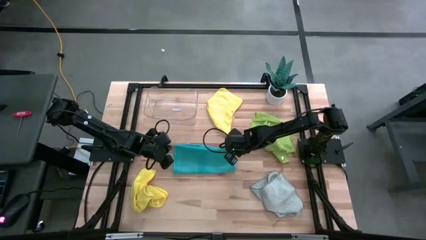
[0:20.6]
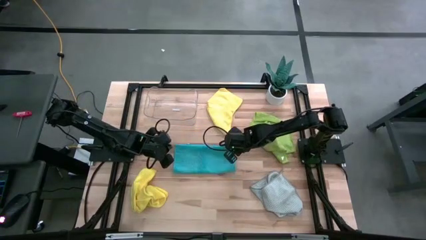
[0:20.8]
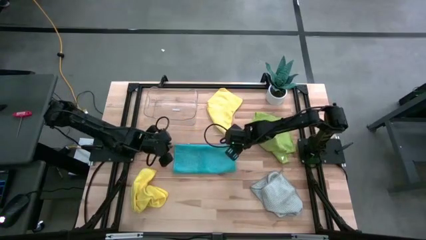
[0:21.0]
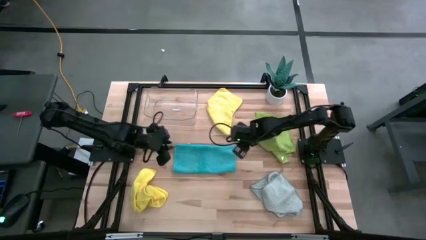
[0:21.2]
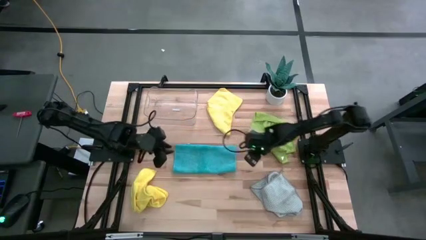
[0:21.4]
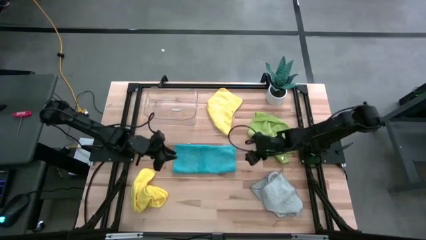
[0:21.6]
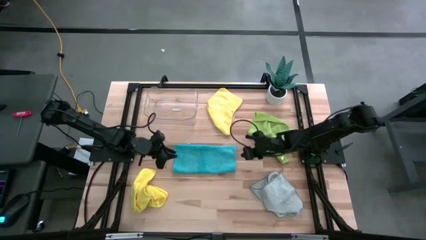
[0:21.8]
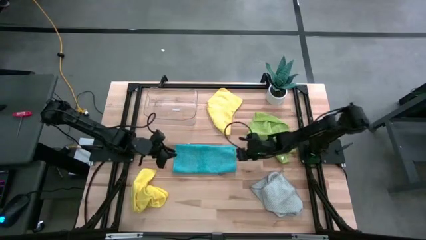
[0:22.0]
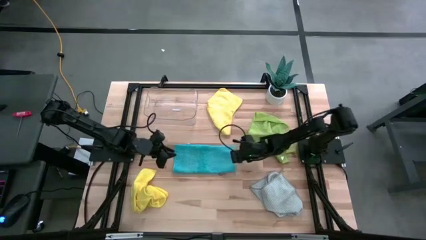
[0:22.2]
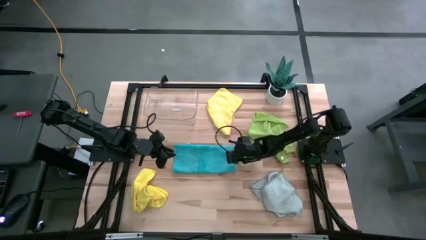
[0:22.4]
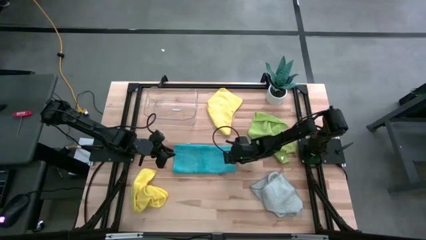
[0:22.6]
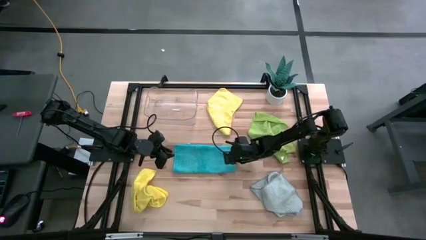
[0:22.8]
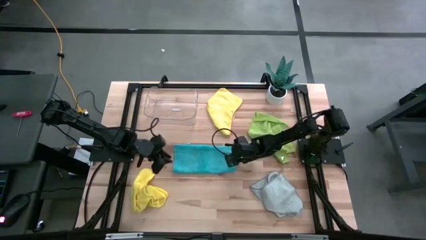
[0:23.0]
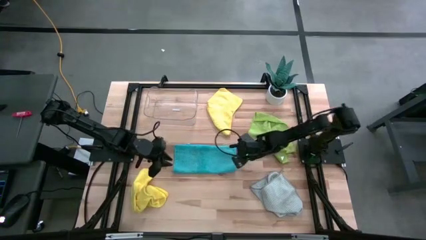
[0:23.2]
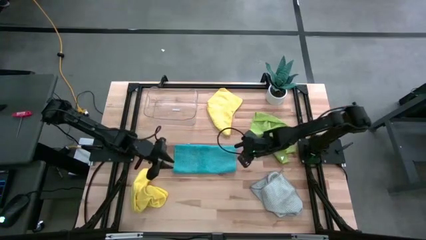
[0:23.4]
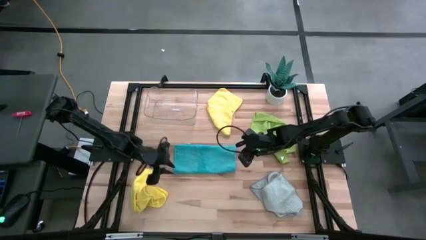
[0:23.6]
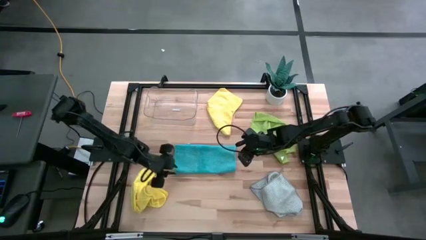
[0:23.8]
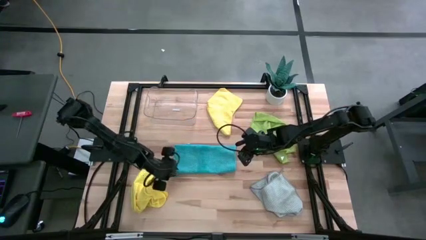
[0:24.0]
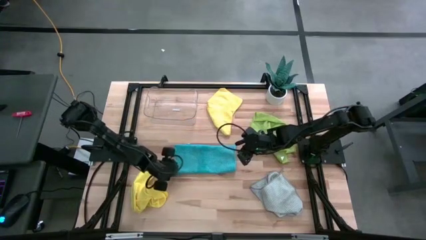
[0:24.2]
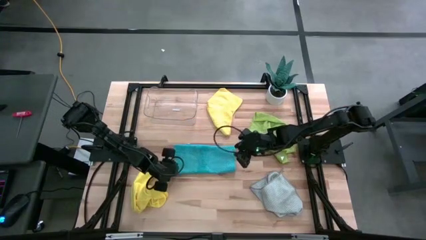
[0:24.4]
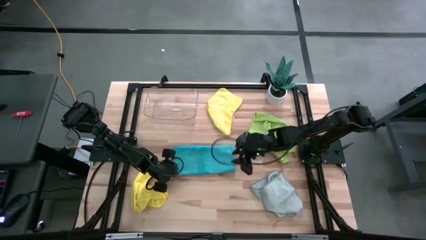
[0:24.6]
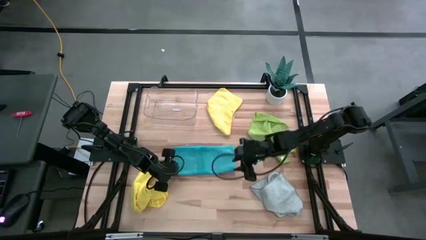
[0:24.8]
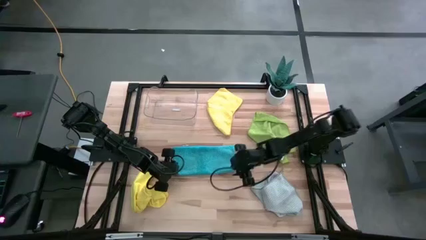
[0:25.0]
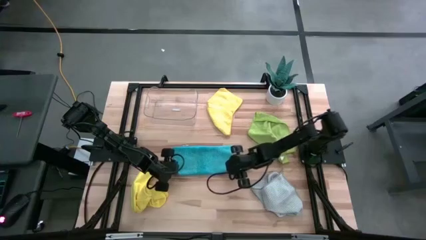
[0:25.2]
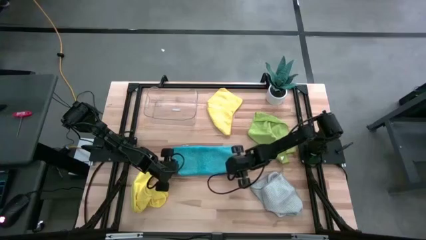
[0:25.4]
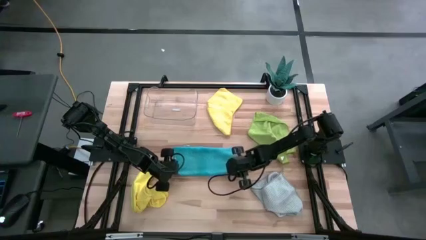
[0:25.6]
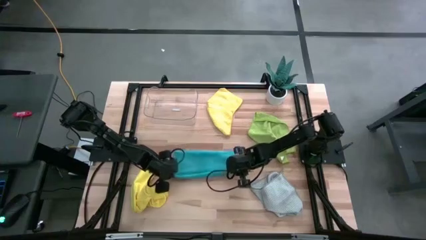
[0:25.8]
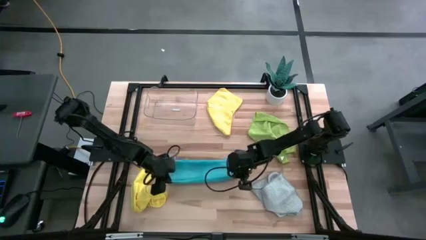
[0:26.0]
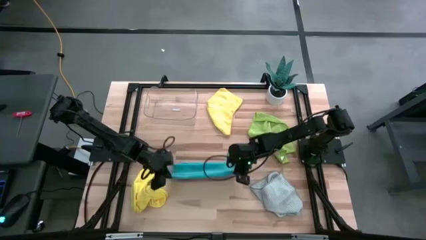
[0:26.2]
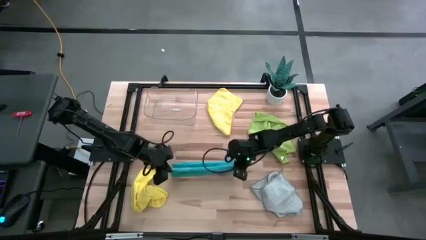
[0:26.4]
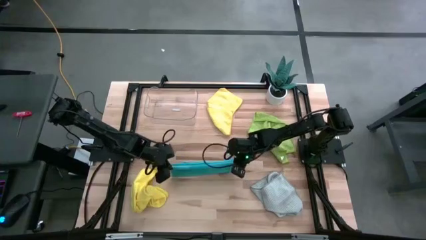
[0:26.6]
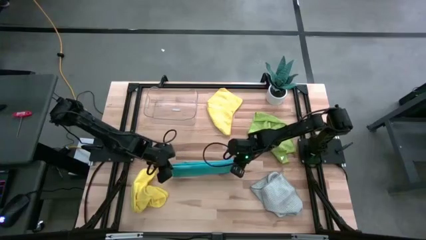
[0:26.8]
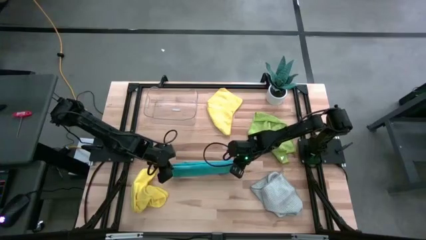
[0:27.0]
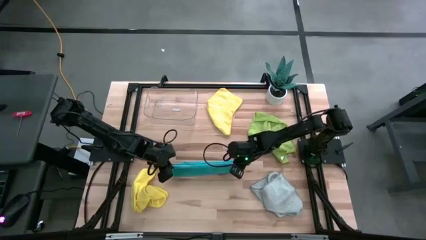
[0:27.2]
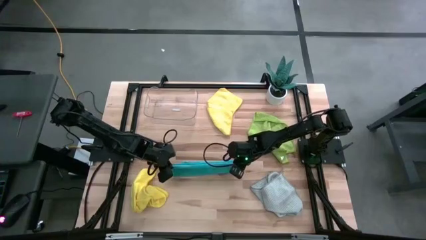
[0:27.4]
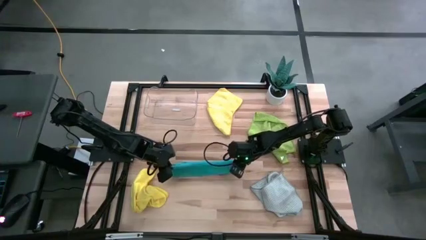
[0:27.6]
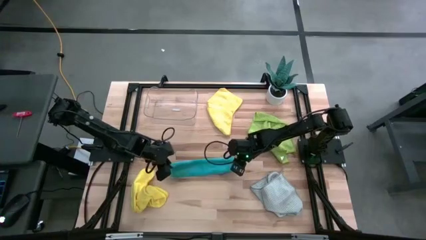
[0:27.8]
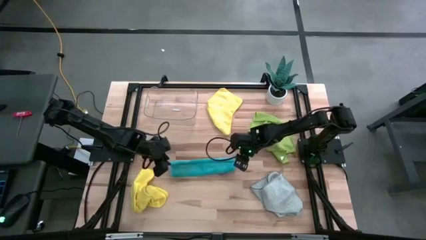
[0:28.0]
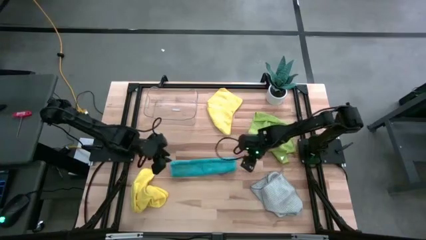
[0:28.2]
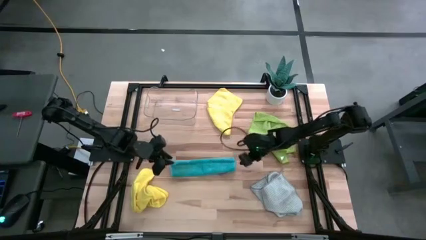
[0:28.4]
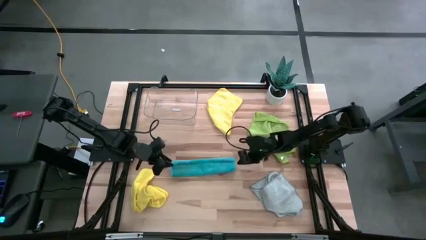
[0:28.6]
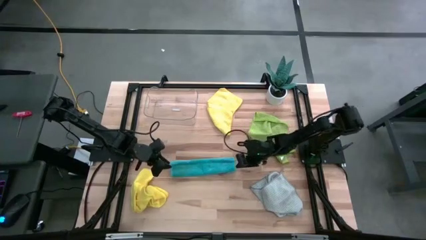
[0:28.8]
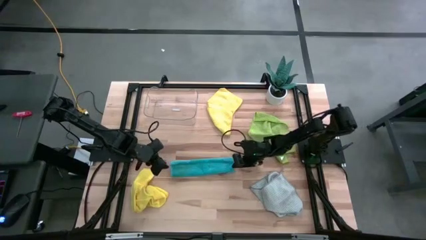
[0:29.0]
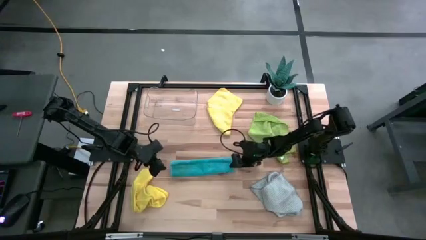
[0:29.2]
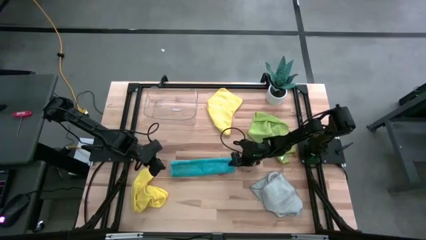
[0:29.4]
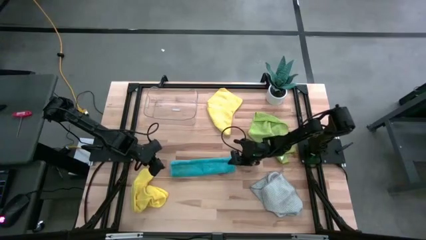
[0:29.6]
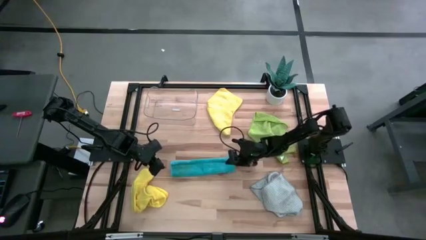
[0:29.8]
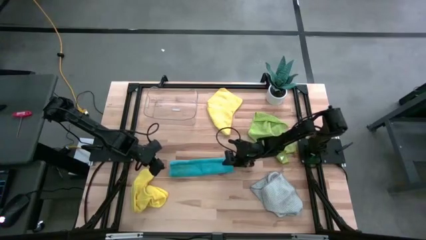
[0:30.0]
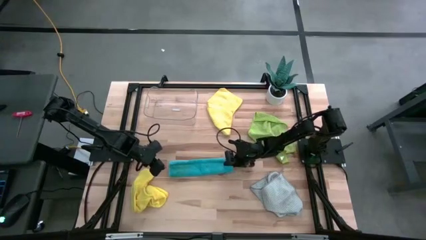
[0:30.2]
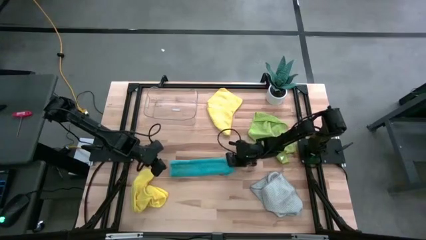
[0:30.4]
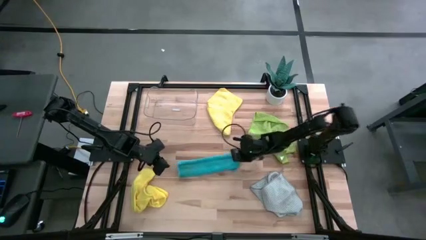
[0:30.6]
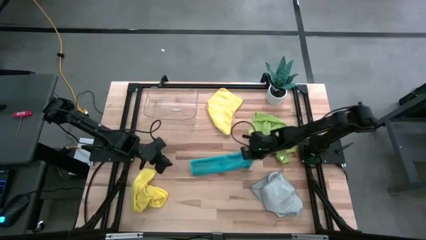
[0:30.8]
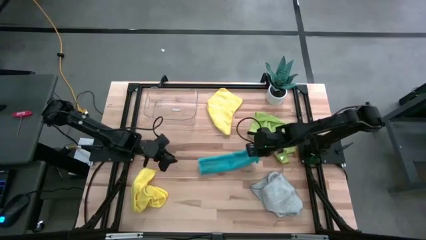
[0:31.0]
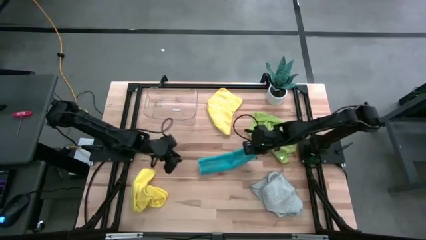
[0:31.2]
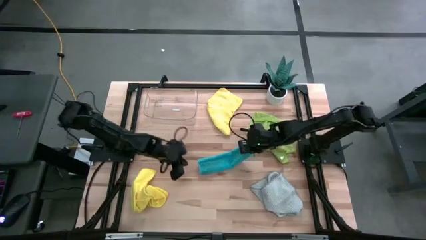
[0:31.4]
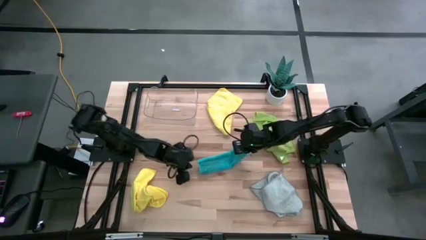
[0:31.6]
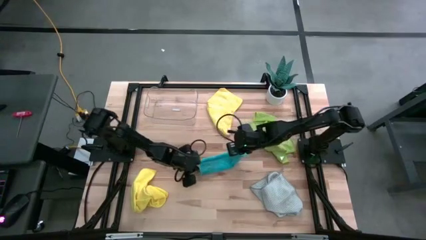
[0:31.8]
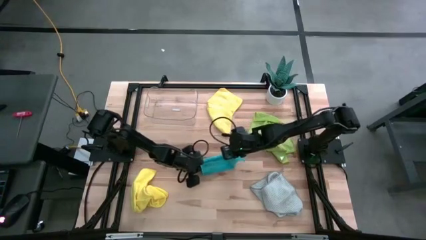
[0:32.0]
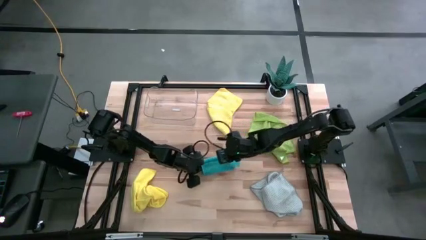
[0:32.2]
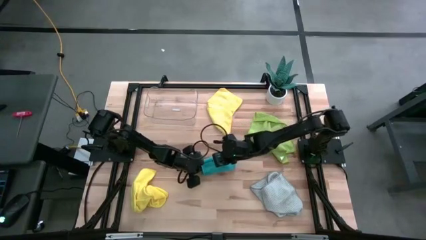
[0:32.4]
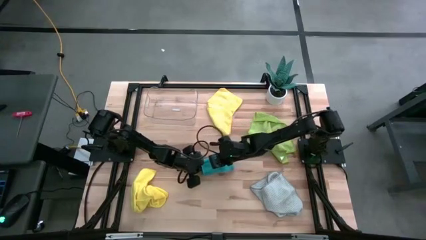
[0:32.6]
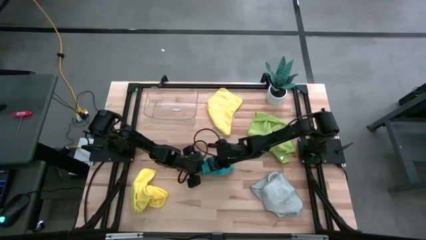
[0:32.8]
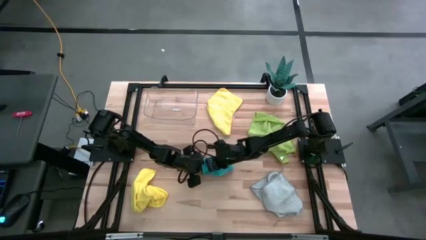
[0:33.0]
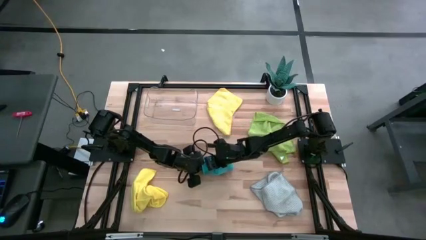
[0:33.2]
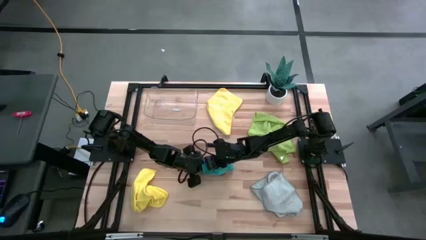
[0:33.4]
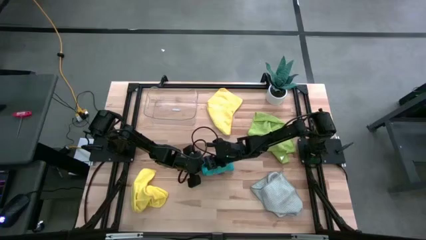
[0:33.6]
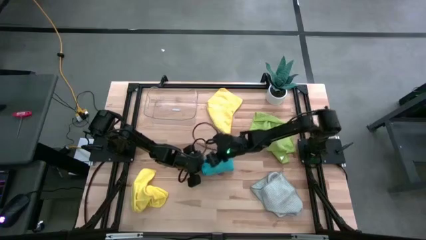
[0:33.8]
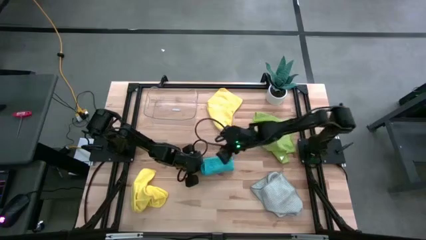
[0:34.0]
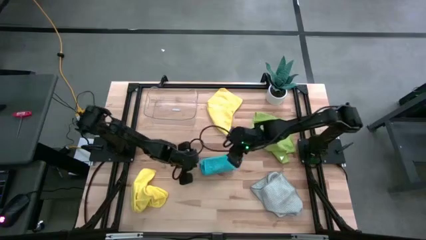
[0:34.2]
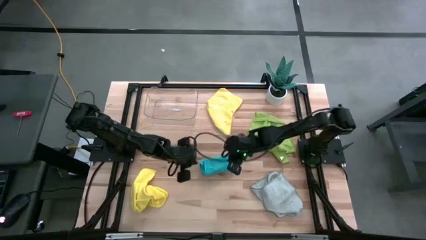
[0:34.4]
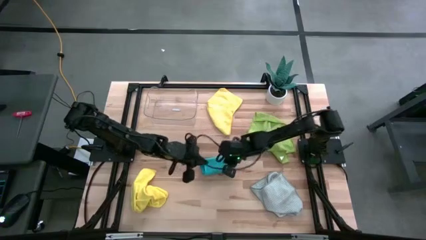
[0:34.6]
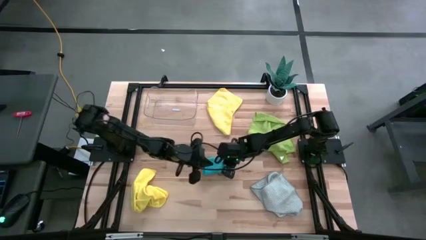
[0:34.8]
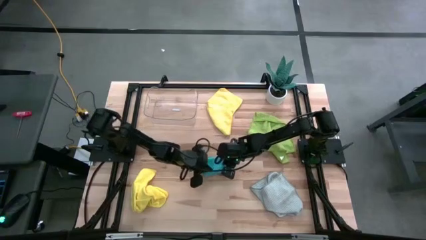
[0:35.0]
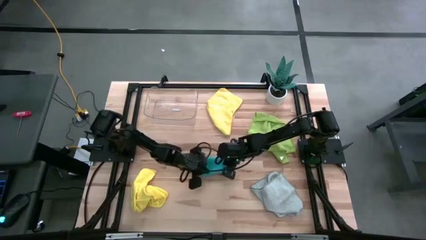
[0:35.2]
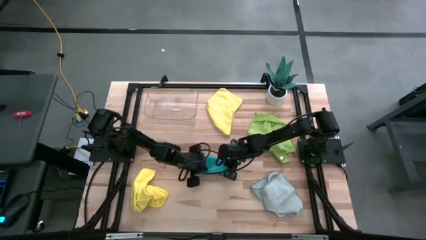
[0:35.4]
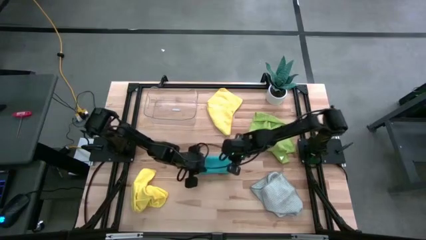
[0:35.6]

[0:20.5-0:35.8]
Task: Fold microfiber towels
Fold the blue towel
